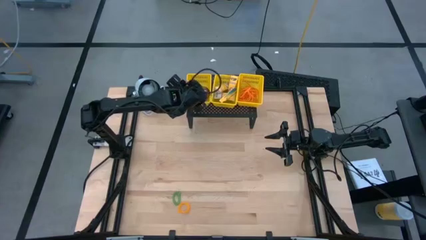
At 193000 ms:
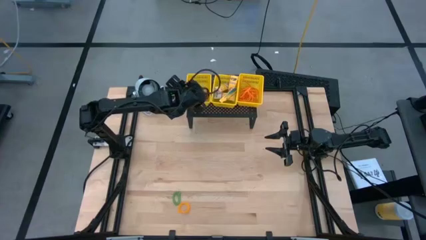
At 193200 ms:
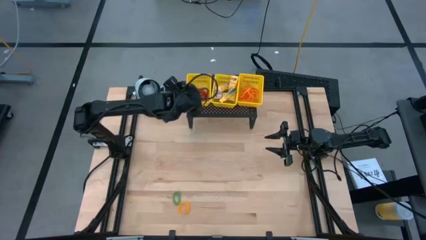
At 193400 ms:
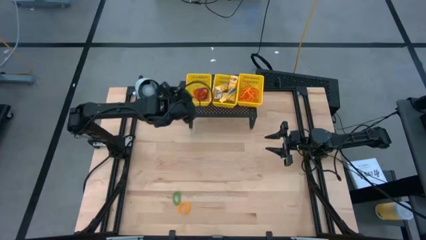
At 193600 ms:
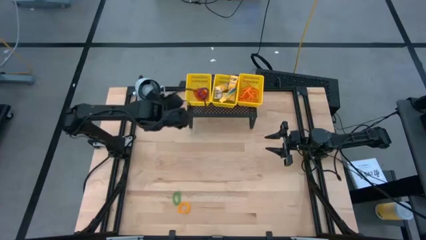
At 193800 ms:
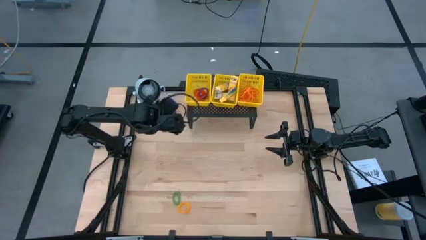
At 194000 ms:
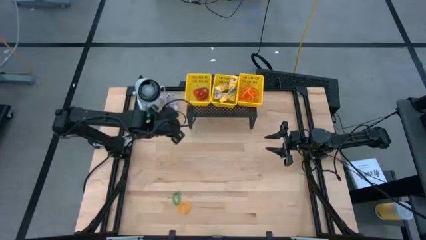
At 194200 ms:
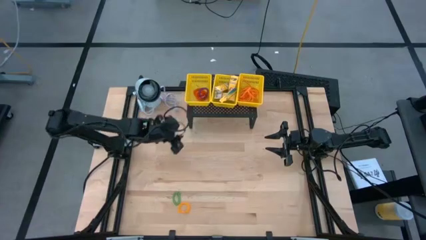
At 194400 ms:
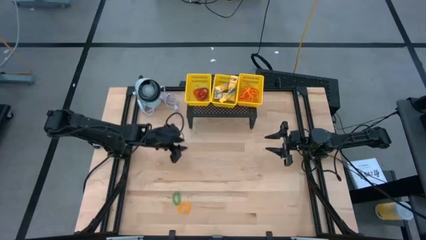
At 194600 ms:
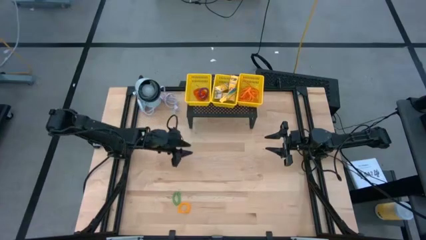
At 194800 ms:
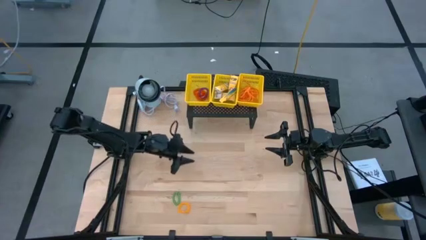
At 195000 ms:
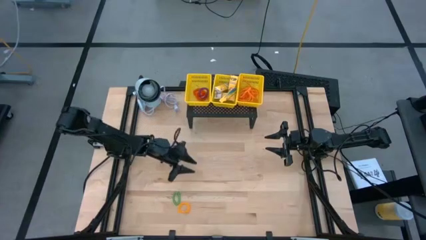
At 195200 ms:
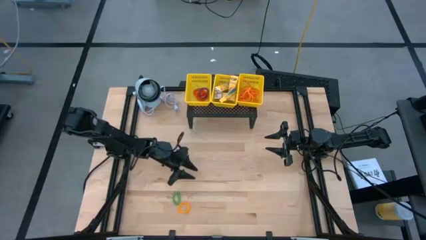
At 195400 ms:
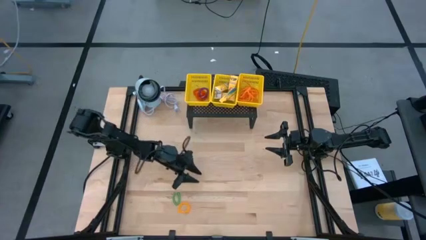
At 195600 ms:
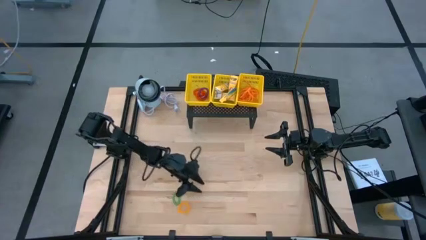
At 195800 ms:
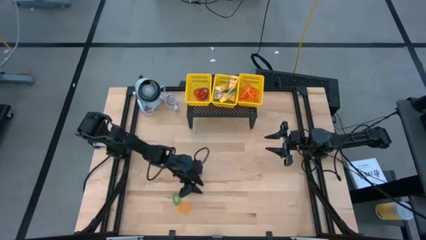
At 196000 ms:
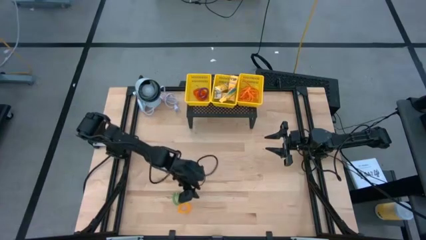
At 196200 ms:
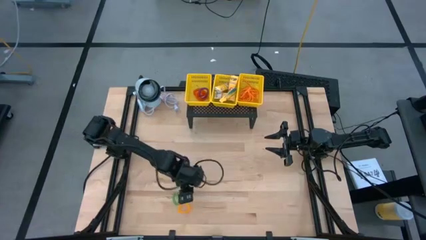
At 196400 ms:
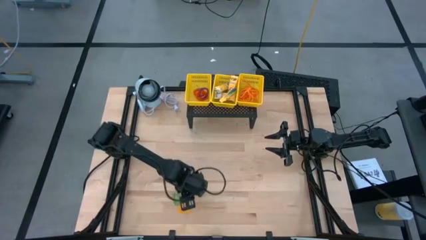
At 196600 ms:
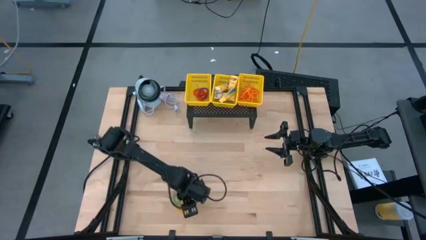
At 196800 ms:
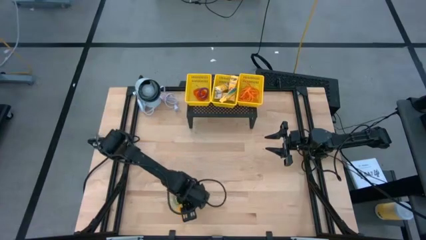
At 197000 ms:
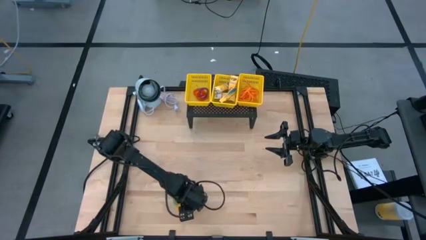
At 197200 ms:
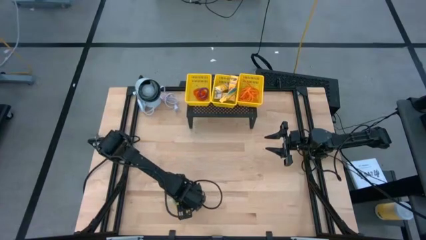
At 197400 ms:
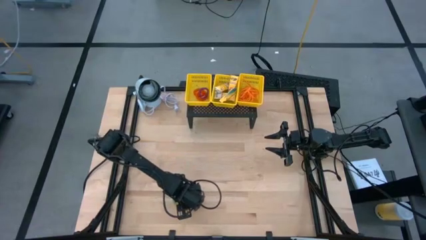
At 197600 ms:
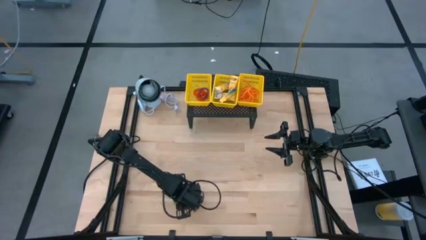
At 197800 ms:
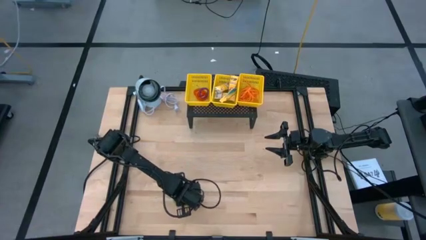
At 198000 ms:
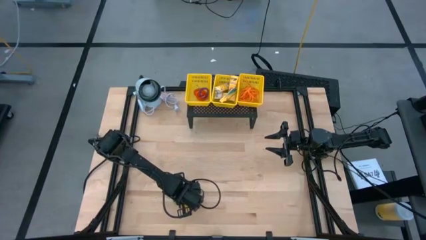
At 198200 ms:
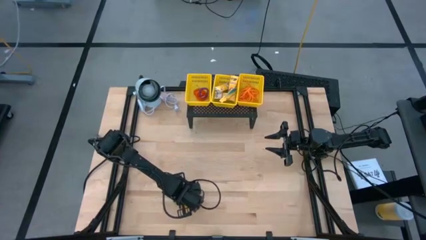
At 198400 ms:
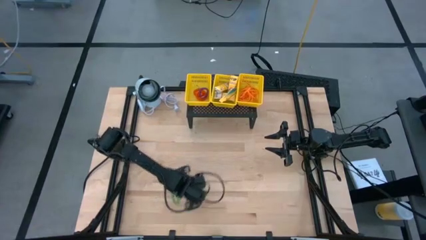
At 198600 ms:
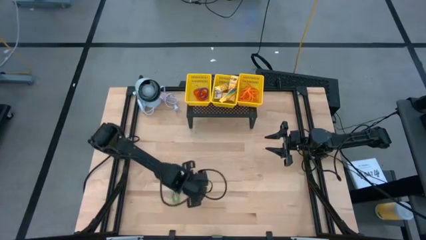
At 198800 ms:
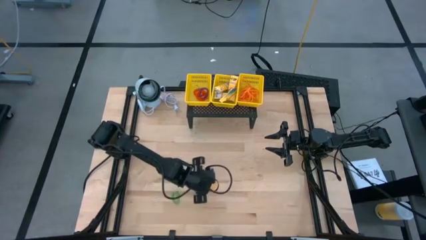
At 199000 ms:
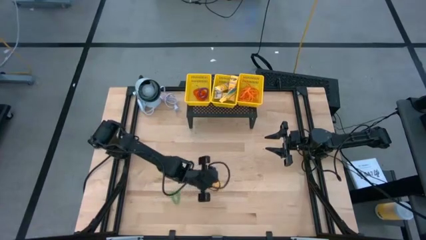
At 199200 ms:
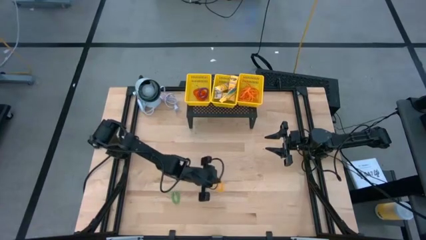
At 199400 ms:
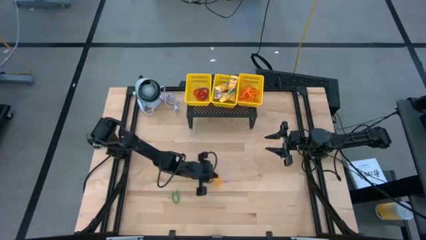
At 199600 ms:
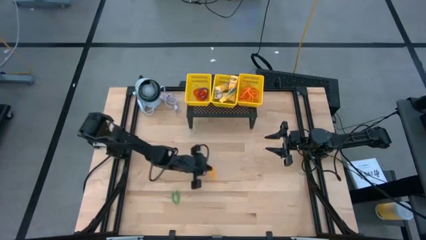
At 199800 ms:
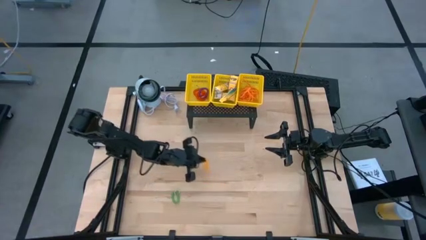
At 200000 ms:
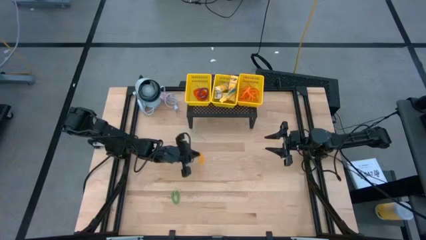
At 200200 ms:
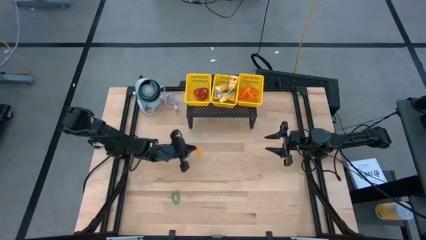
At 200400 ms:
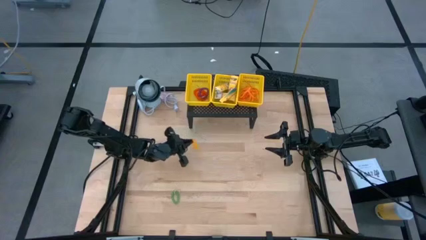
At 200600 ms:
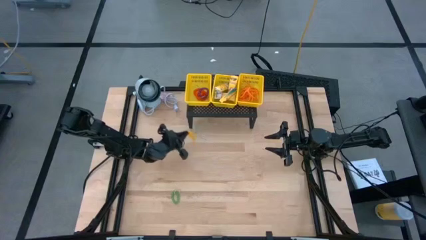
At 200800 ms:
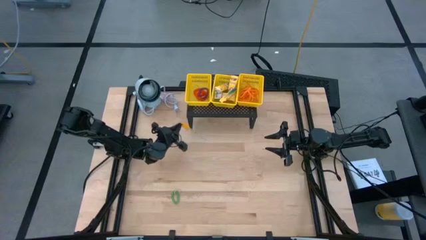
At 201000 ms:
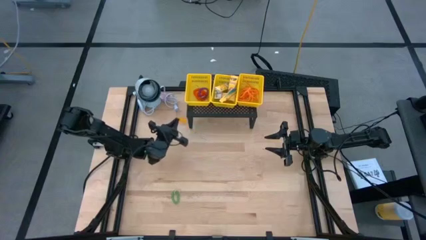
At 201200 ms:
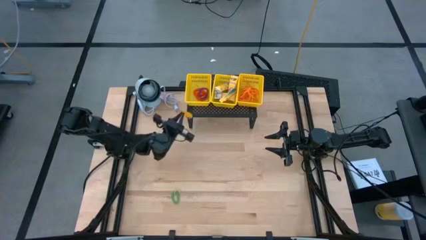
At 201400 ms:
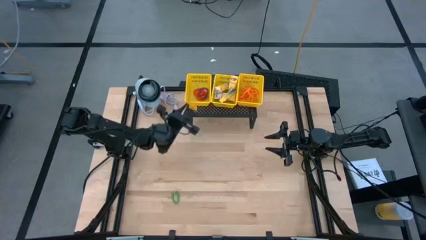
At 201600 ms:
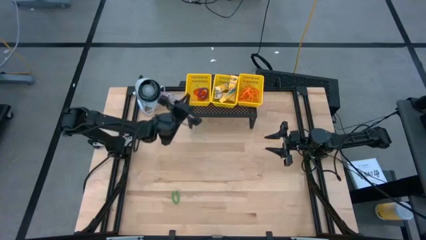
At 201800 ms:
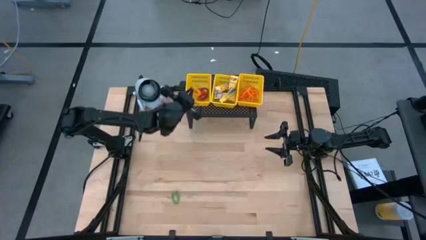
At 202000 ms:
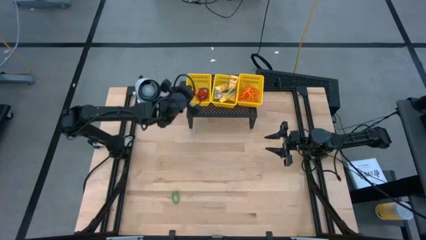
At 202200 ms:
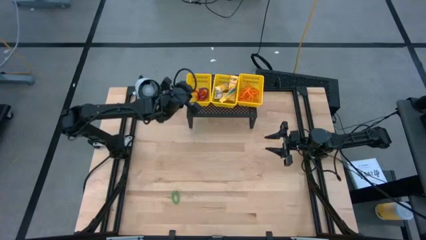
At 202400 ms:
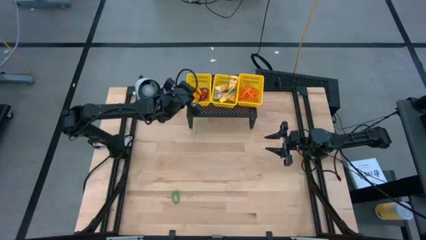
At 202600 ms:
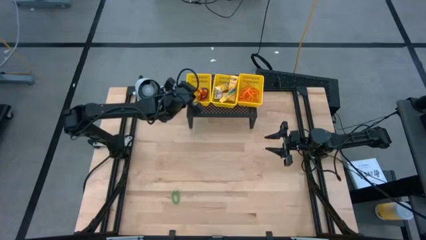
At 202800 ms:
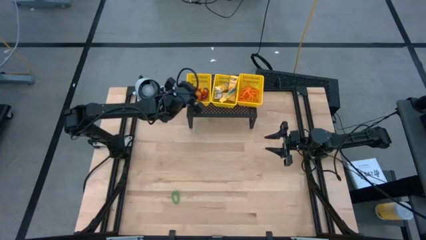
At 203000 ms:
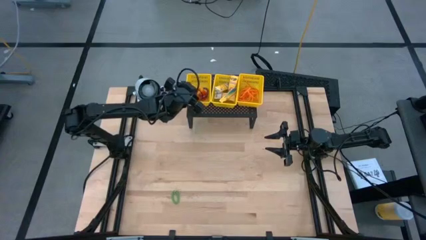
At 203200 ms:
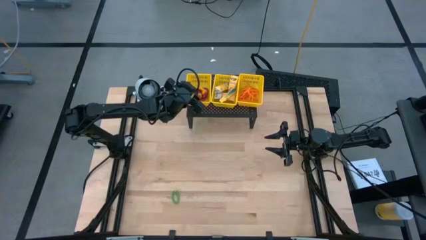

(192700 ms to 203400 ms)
Task: Pick & Place Office Desk Supplies
Put the yellow spring keychain into the left yellow bin on the shelf

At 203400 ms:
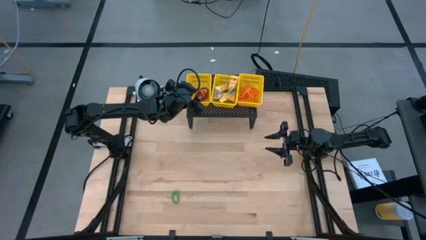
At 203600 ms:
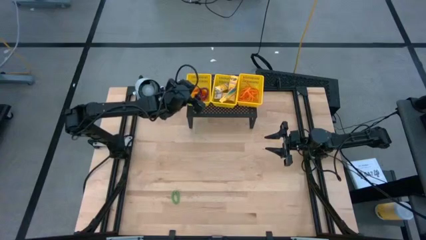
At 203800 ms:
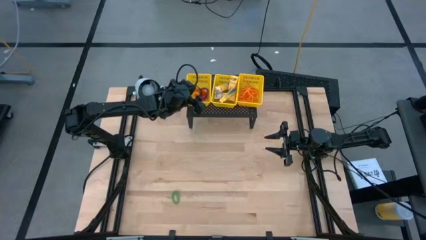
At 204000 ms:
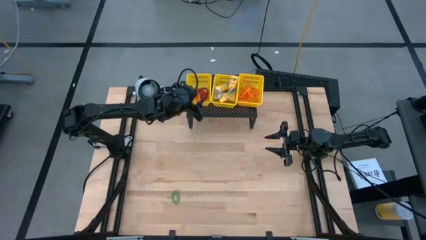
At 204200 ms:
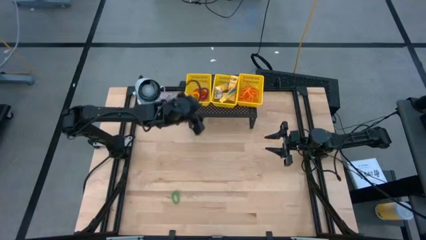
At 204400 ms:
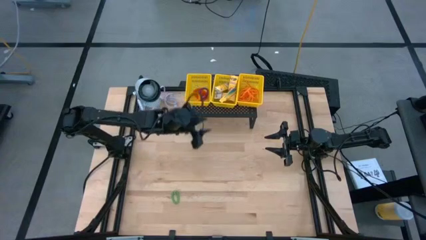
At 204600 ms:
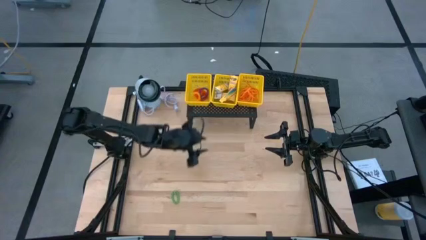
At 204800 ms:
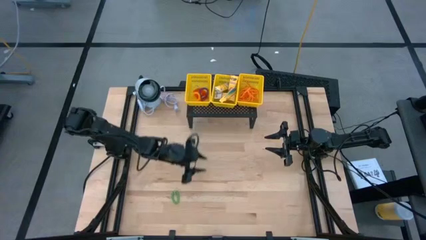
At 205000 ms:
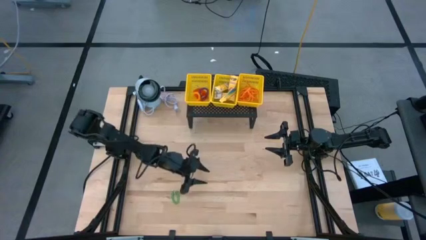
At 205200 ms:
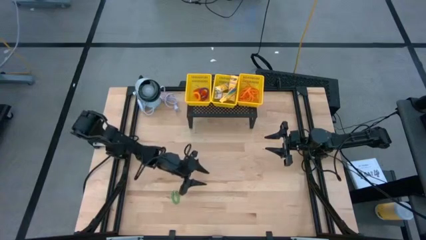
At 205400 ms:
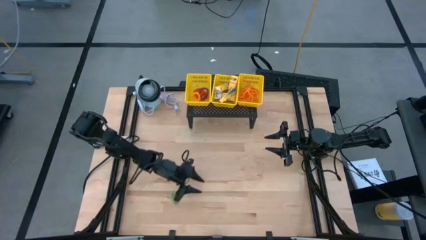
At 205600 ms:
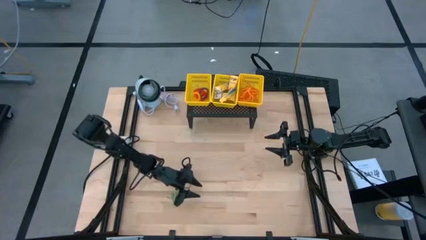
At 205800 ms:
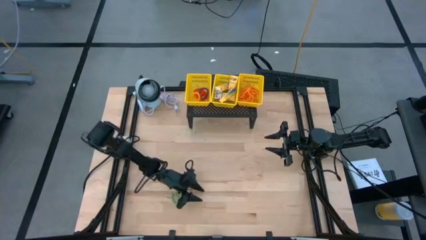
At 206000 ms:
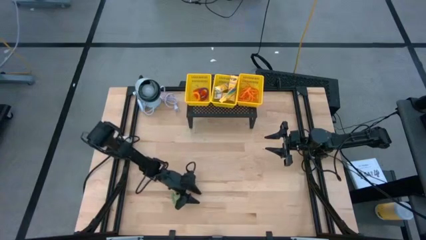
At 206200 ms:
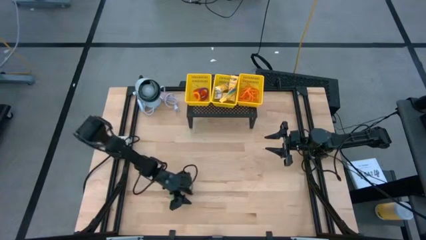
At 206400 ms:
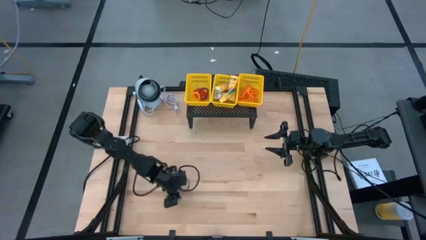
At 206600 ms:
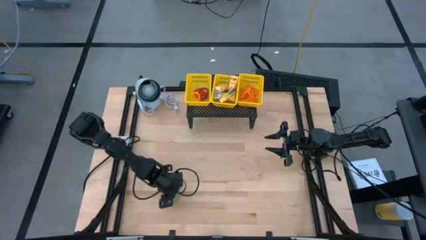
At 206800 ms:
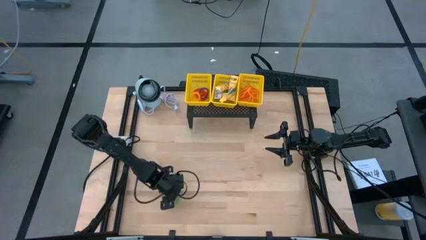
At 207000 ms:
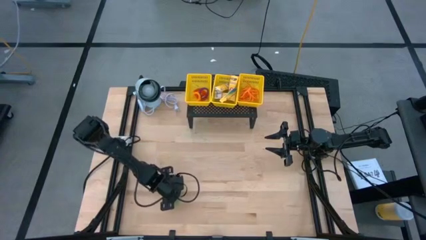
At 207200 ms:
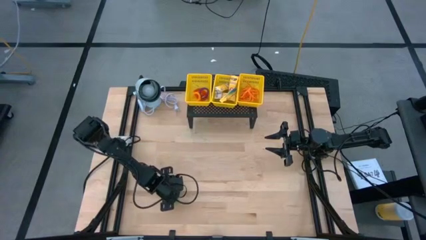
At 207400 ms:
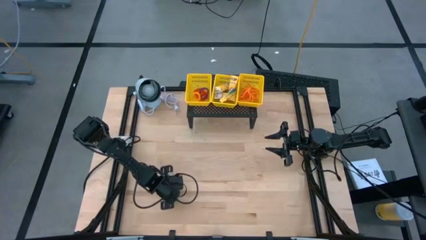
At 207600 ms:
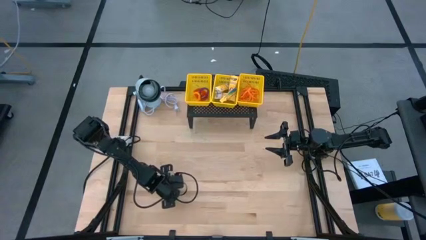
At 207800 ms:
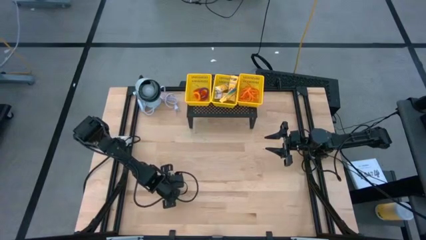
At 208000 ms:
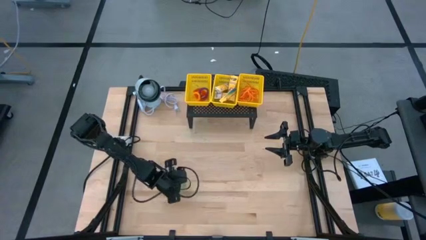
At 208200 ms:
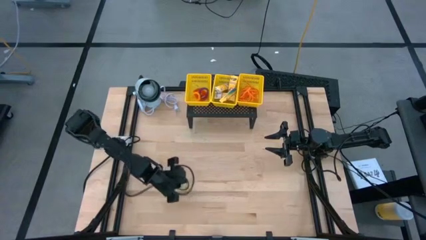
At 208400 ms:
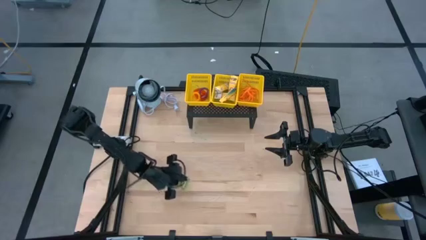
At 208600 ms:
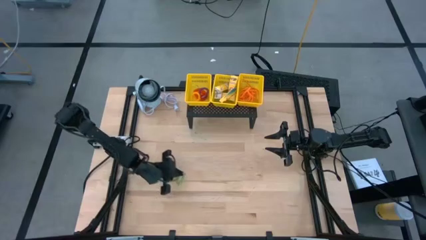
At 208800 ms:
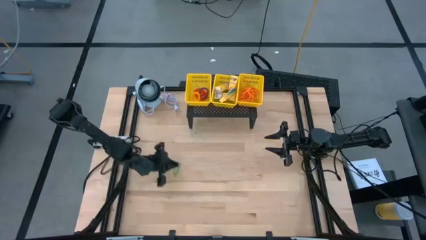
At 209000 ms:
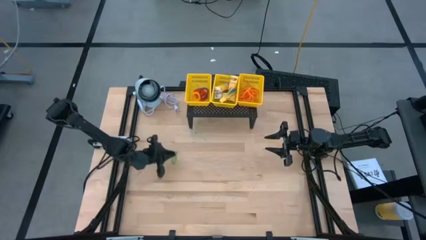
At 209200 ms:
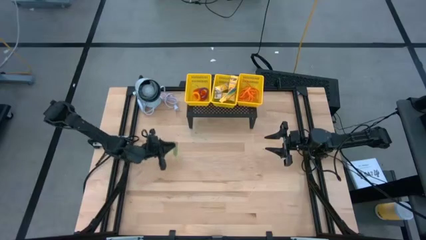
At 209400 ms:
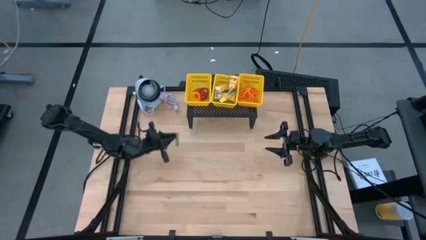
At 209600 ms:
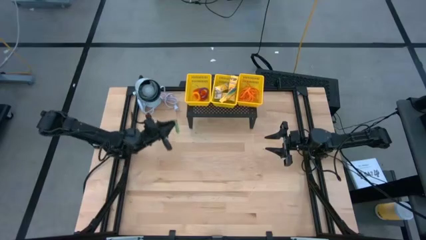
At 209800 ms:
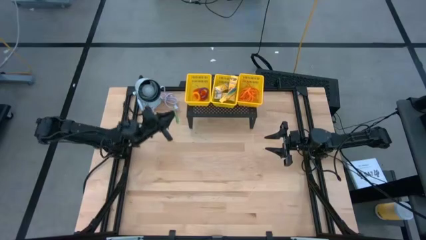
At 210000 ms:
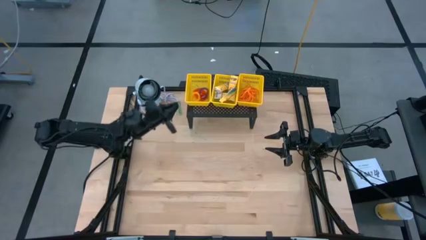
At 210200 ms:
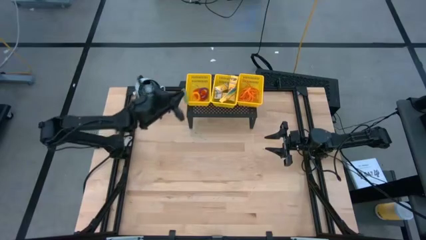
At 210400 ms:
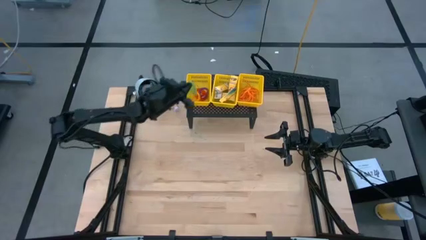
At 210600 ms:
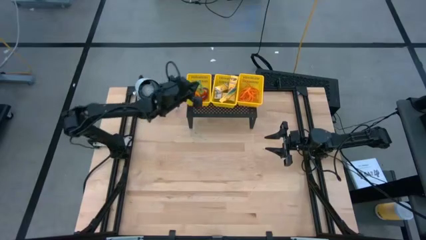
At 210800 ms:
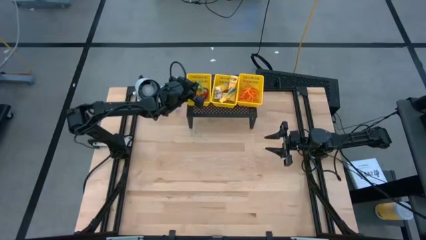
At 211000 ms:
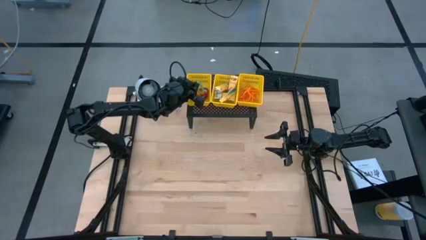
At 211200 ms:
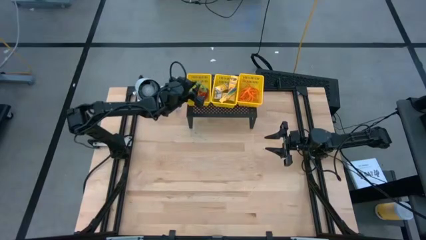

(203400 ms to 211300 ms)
Put the green spring keychain into the left yellow bin on the shelf
